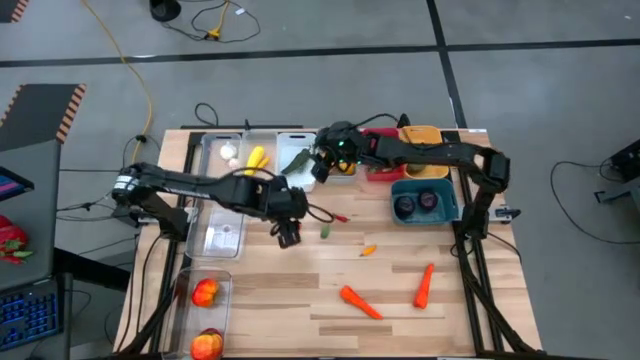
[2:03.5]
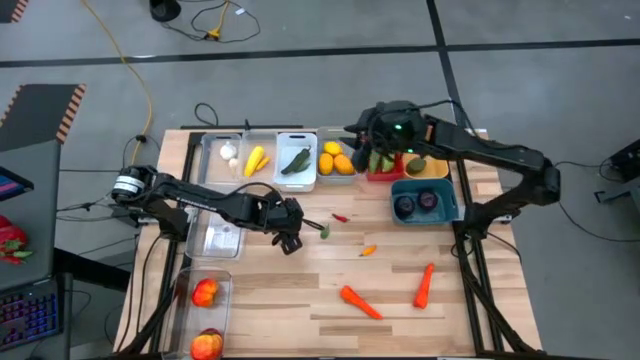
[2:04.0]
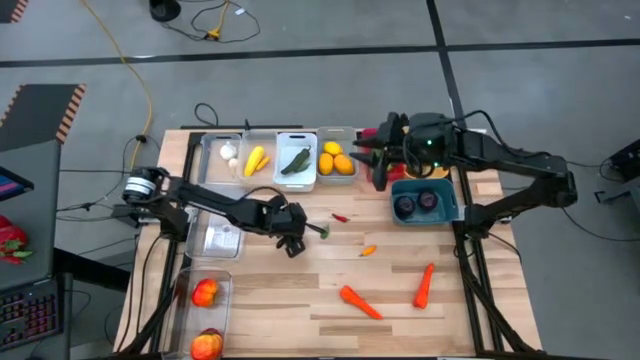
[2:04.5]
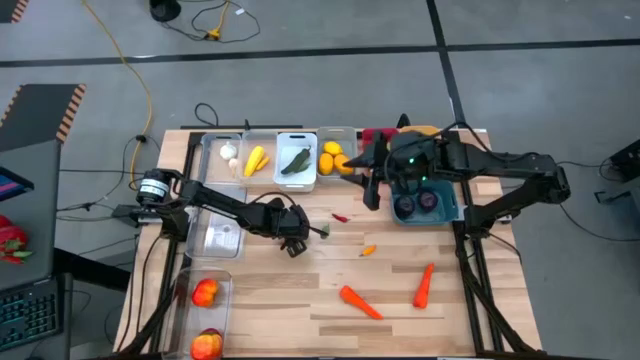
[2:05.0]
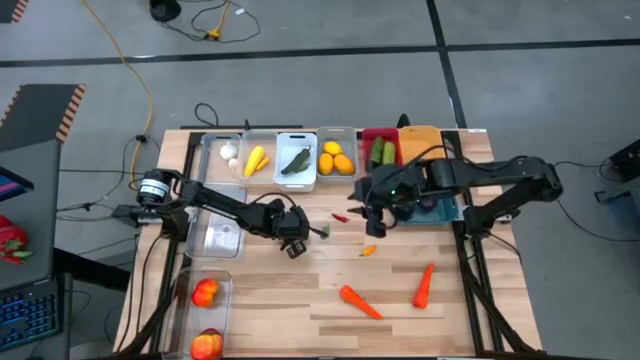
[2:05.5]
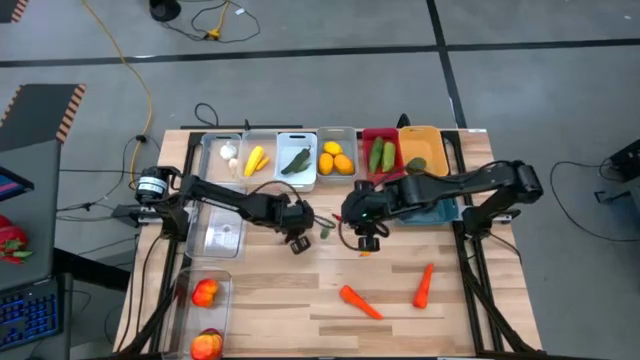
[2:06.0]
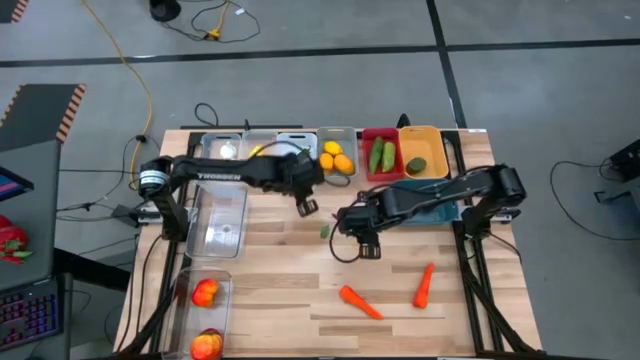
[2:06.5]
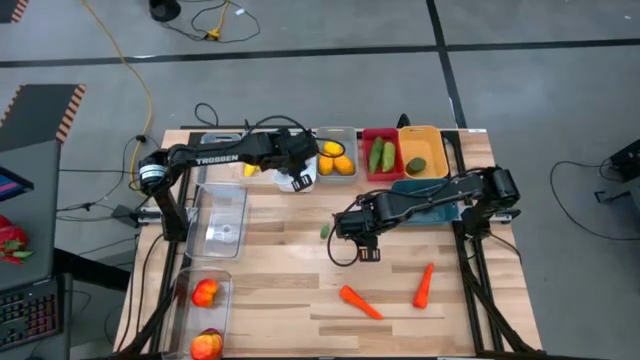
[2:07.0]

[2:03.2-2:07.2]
Task: Sort produce into baskets
Put the orange chili pepper into the white bin

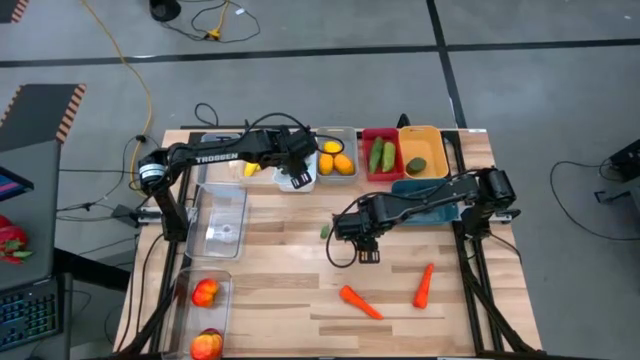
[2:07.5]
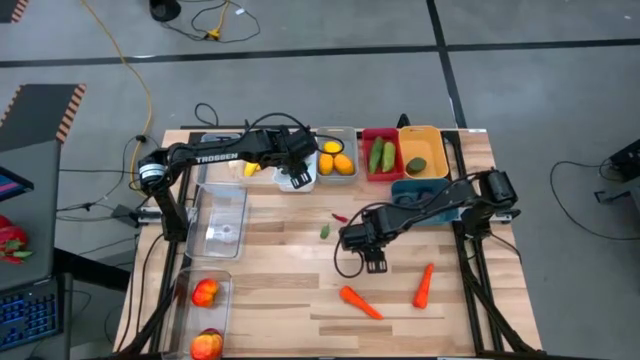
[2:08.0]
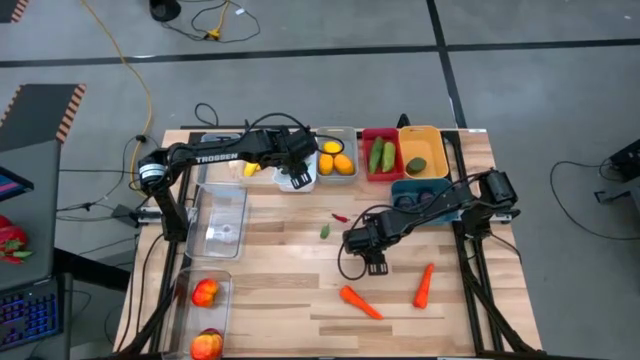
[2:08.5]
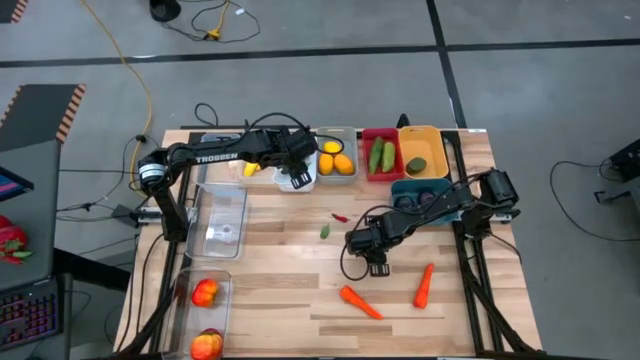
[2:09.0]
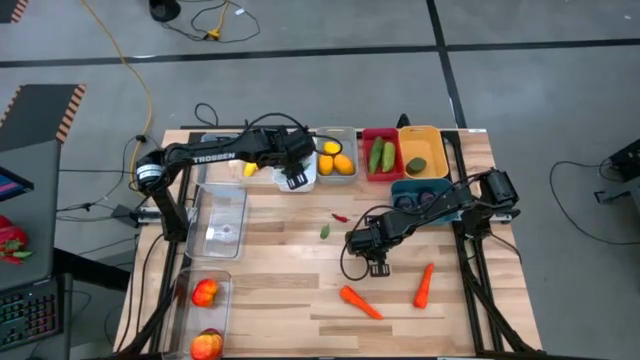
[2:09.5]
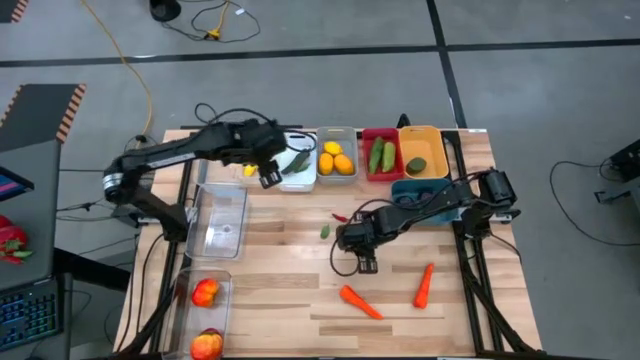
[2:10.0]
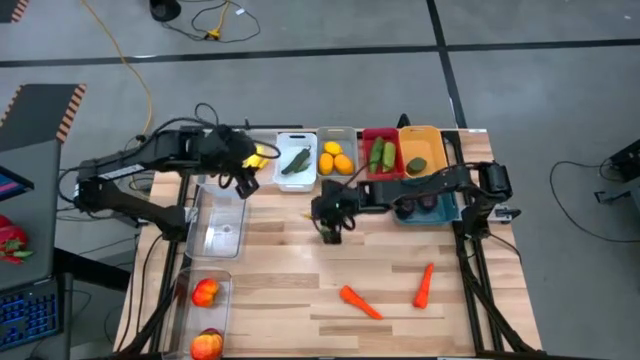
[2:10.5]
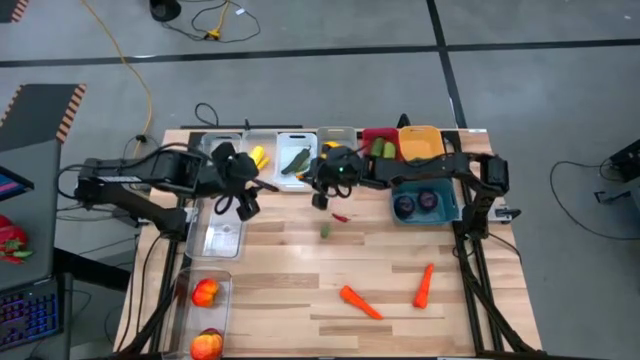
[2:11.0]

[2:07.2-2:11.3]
Put the yellow chili pepper into the white bin

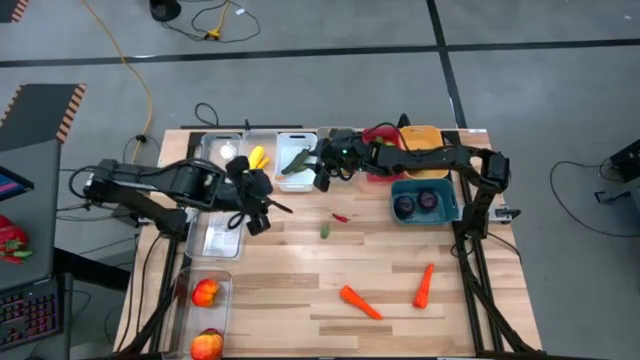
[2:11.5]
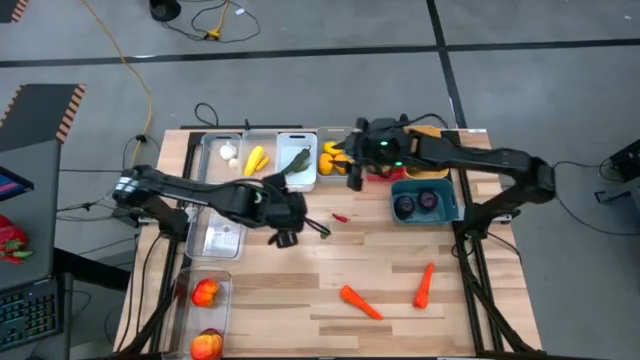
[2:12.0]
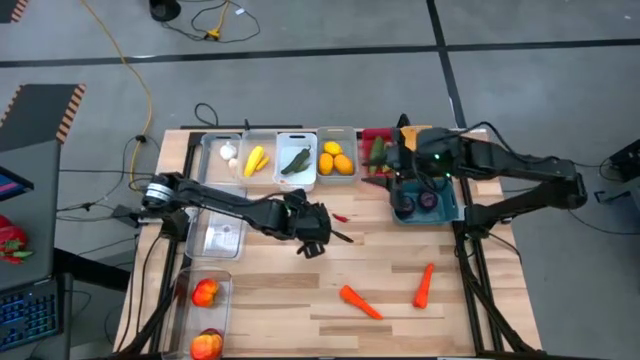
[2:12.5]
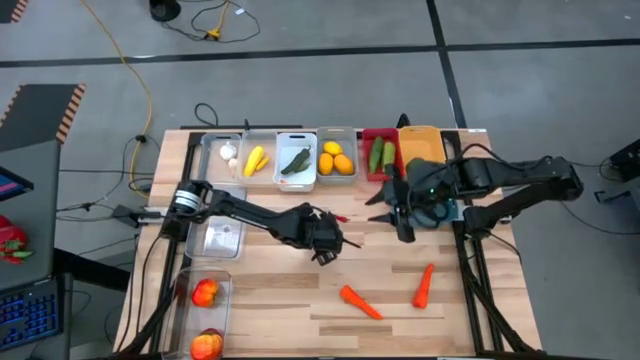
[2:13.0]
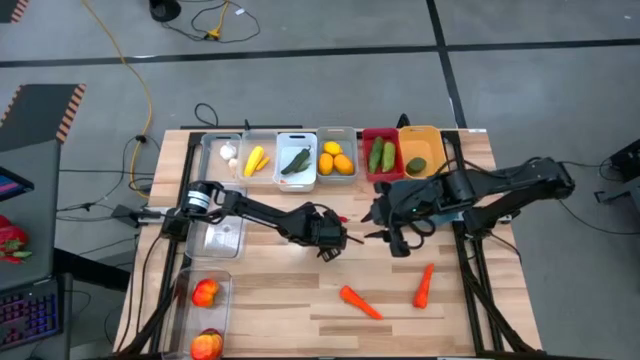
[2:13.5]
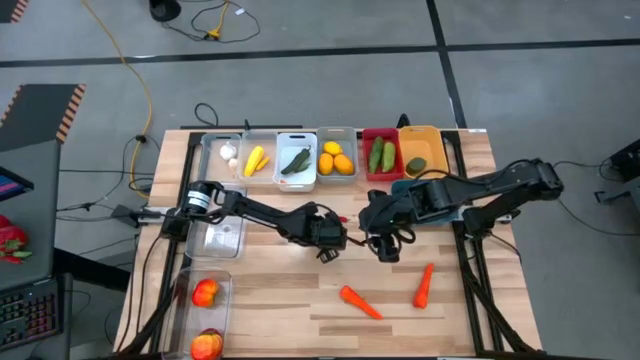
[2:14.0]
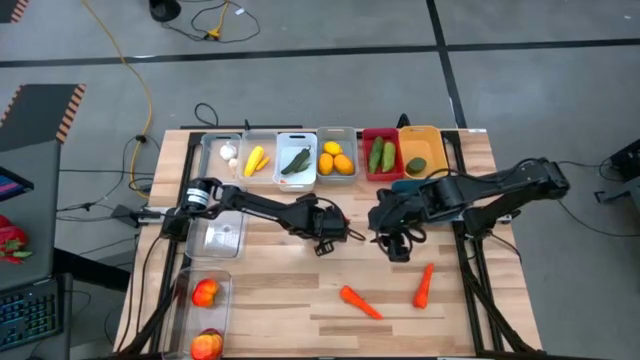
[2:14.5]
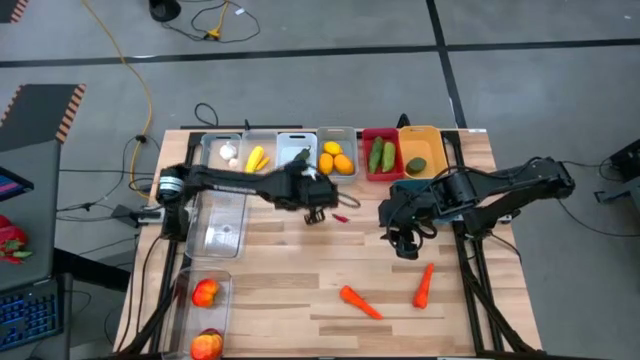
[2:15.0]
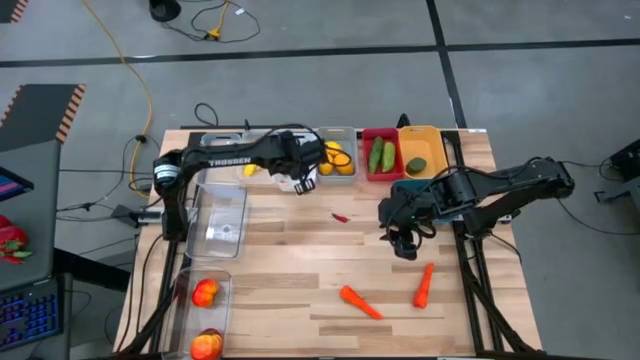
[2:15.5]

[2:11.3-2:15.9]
Put the green chili pepper into the white bin

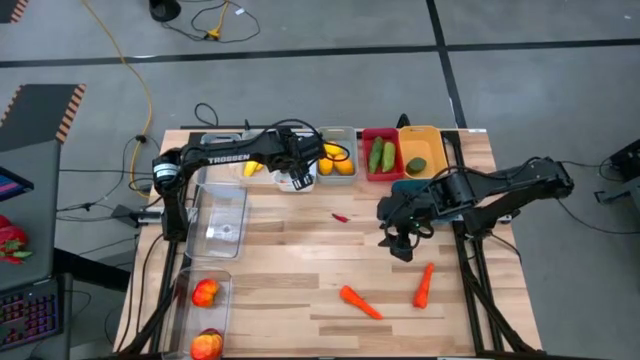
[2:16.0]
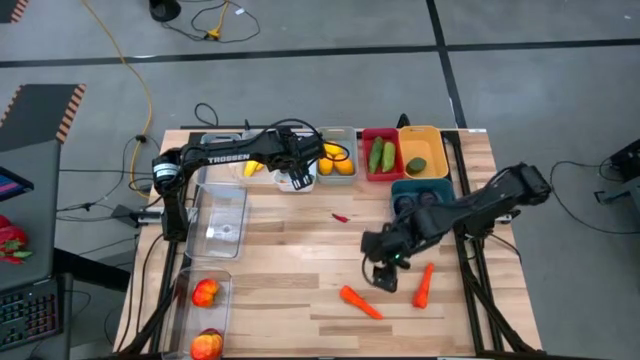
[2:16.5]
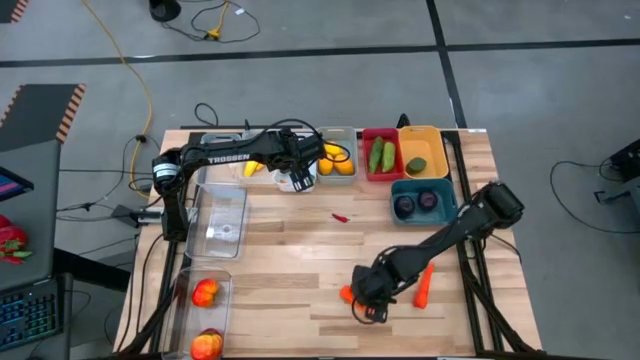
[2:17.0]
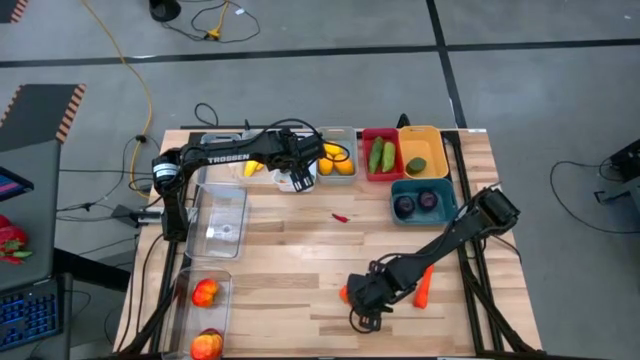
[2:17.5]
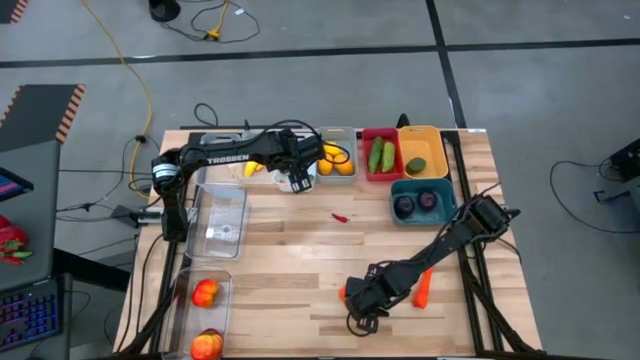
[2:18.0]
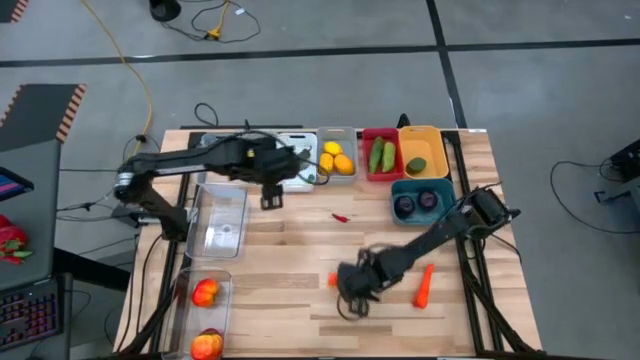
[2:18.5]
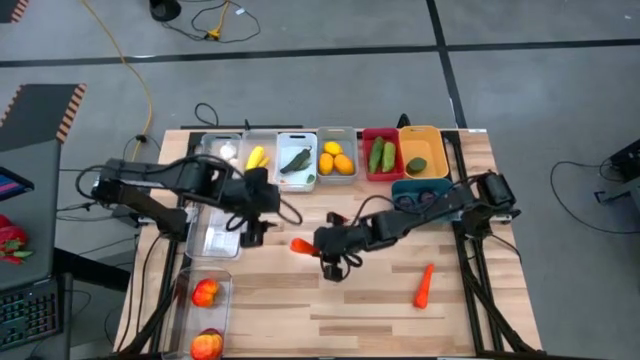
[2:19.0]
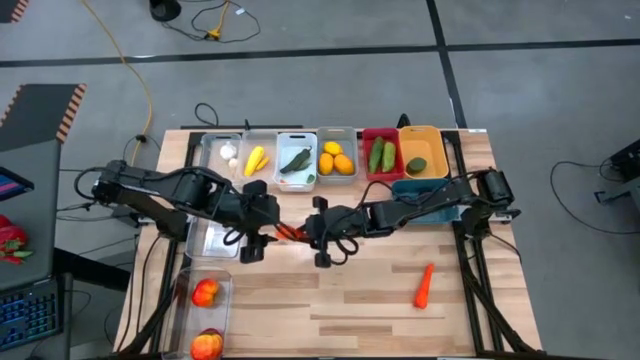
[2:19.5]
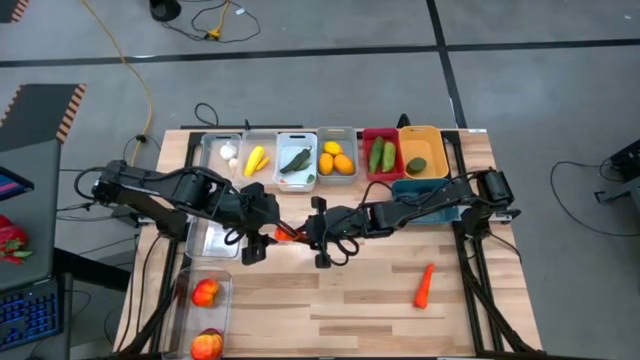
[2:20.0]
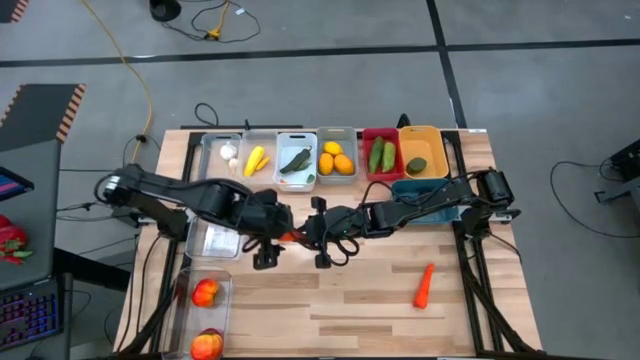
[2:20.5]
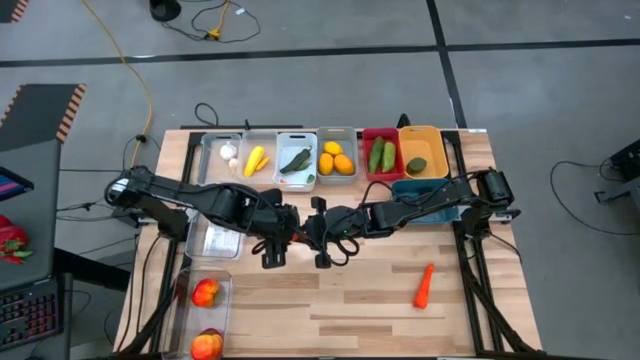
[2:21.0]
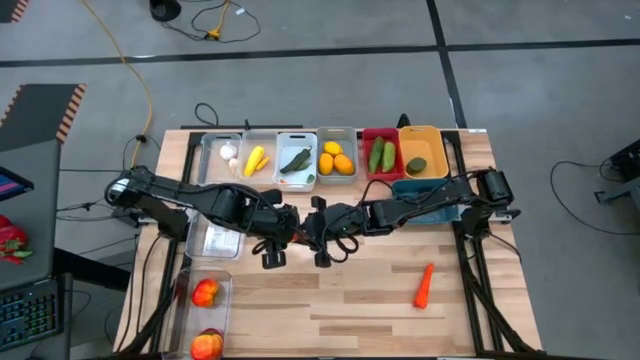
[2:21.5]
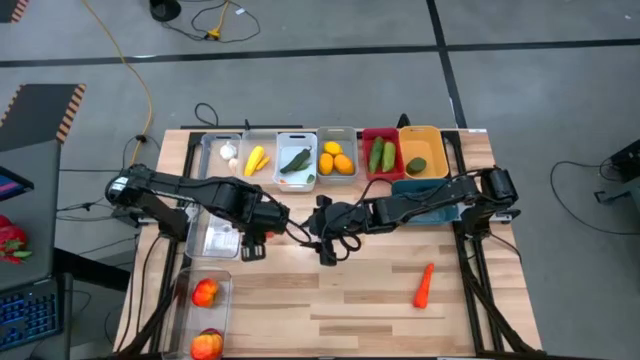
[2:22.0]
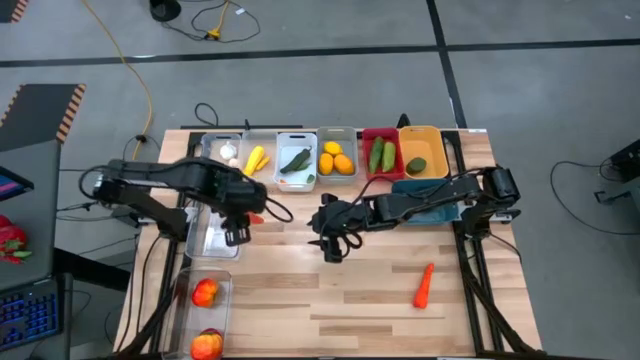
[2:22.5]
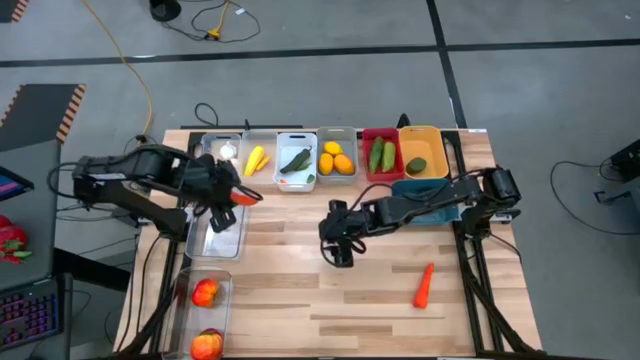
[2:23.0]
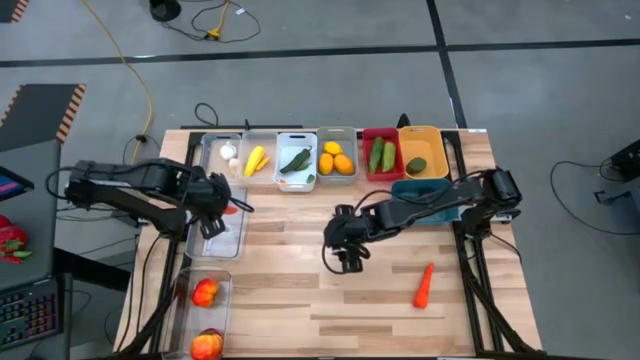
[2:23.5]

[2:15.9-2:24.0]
Put the left carrot into the top big transparent bin
